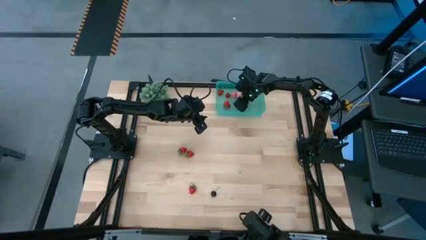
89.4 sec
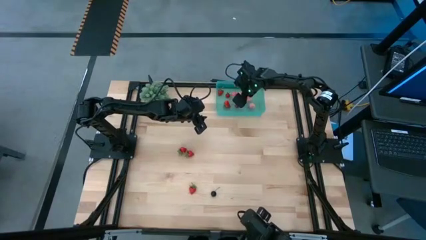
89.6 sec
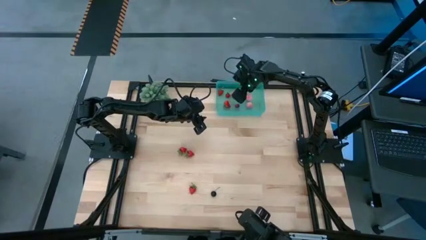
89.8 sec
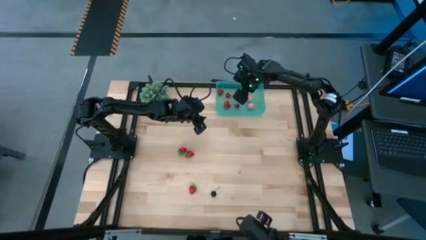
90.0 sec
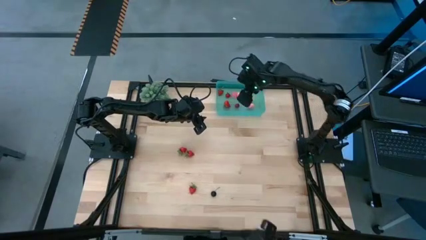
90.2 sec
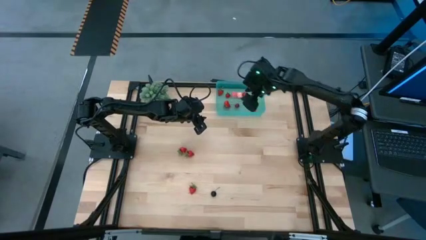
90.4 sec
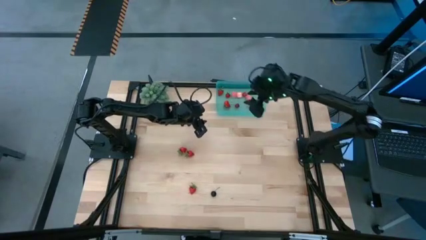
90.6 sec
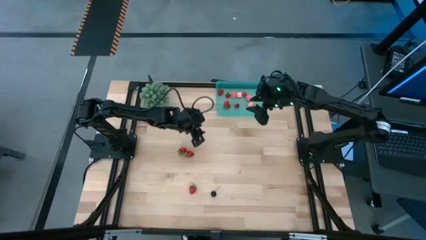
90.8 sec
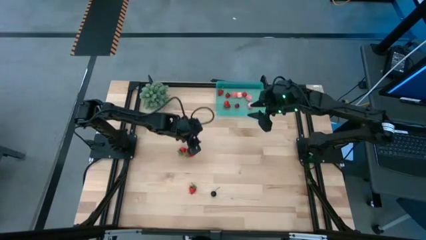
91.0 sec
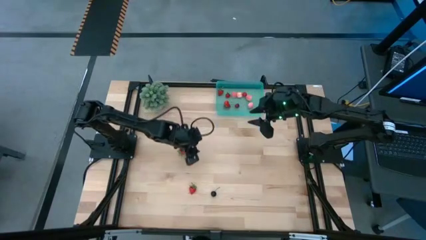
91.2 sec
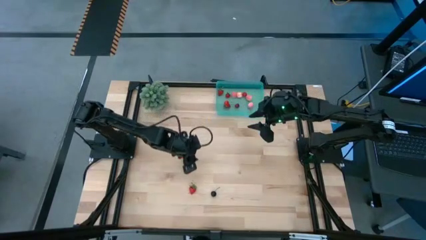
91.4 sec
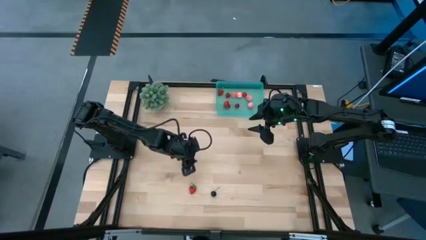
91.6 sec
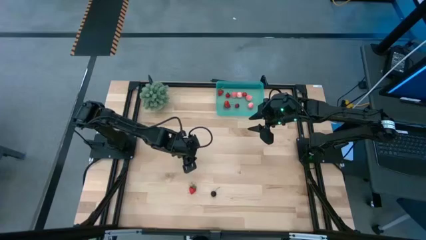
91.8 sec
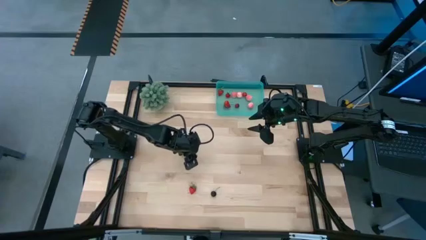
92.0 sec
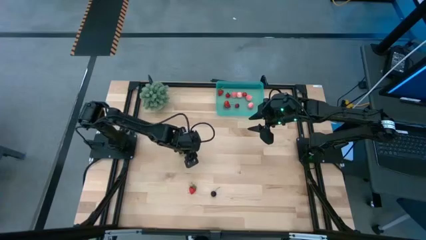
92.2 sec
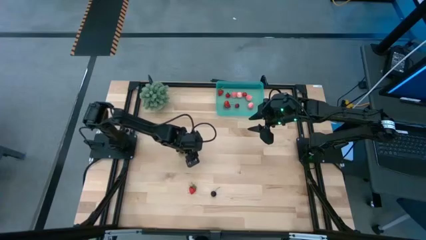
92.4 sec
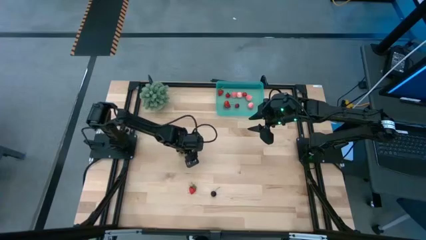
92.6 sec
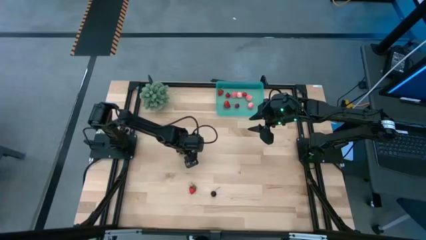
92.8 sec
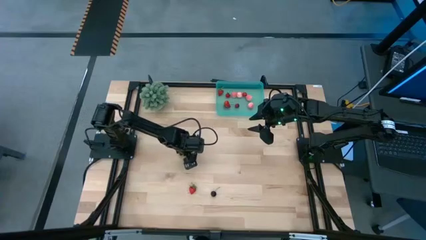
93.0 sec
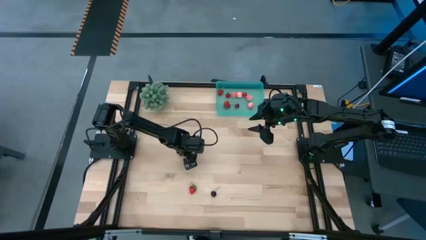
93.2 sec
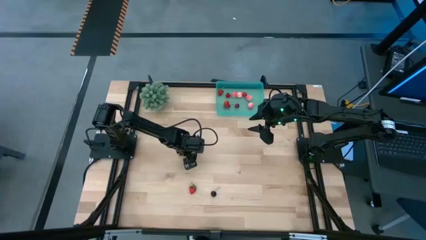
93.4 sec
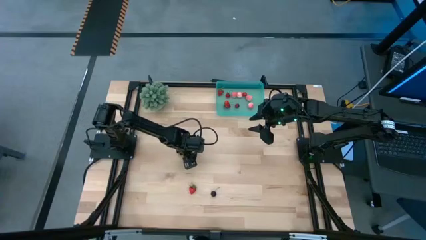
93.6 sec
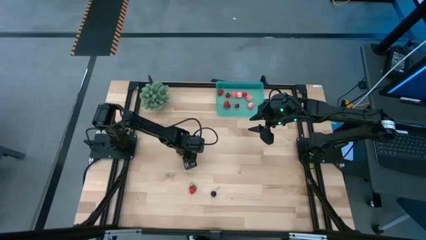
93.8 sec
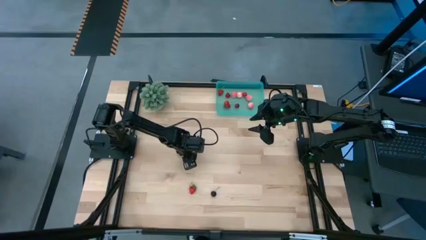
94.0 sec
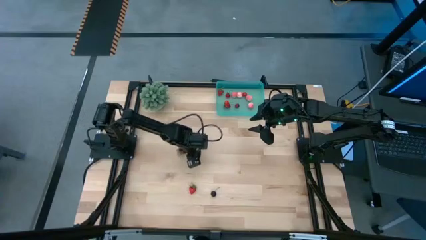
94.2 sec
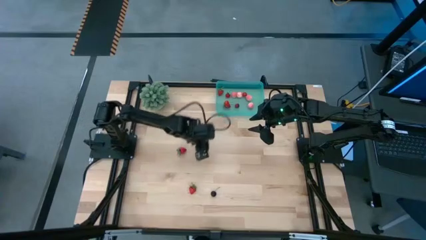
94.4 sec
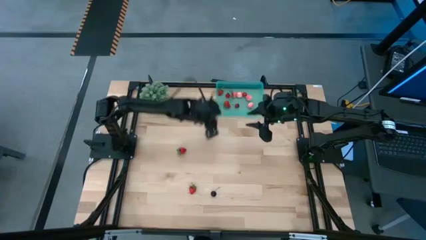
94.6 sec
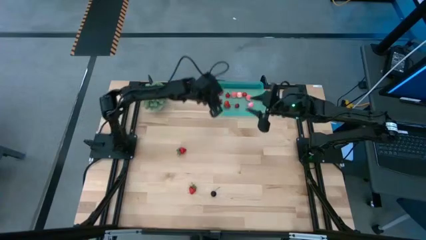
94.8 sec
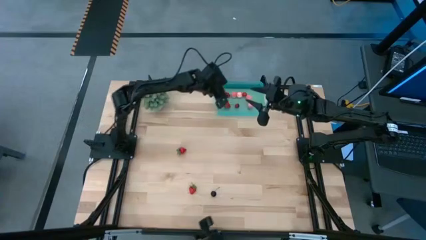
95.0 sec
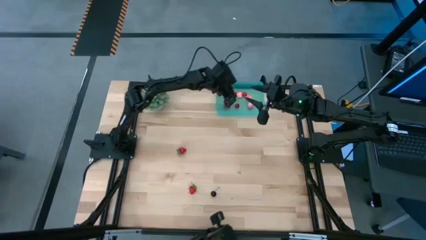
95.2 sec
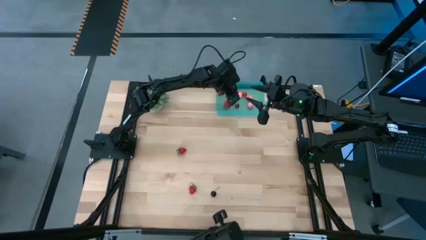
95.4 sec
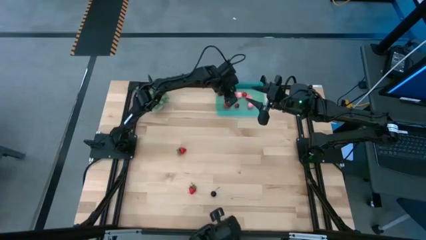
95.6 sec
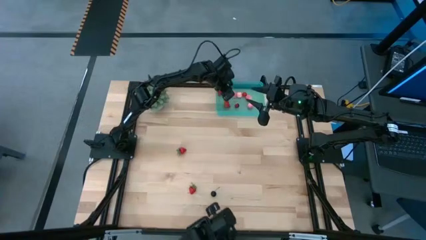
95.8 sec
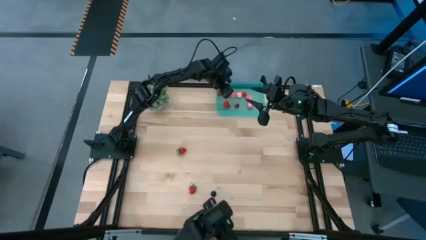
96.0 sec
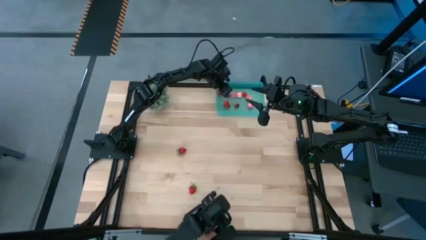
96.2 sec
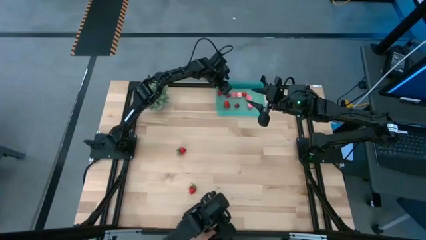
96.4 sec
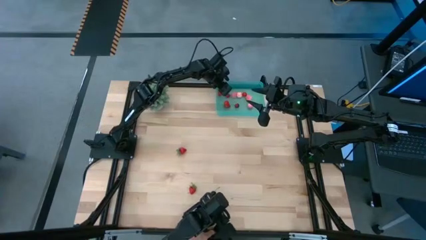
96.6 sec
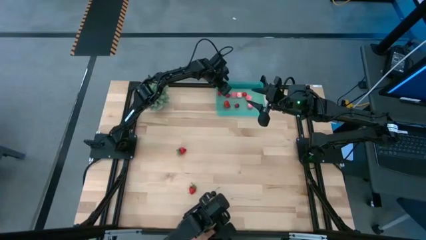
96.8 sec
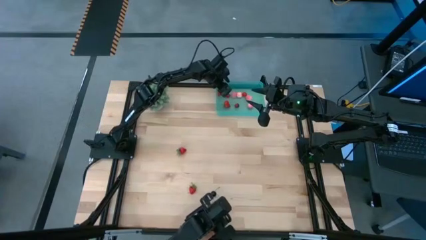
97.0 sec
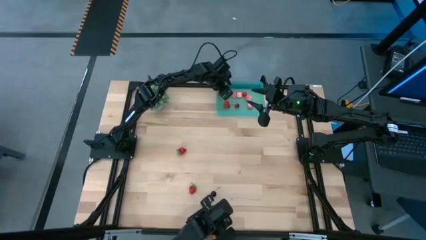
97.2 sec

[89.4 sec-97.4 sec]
Task: Pick and placing Produce into tupperware
Put the strawberry into the blue bin

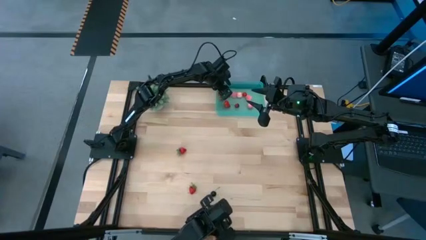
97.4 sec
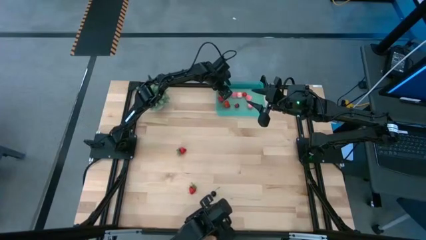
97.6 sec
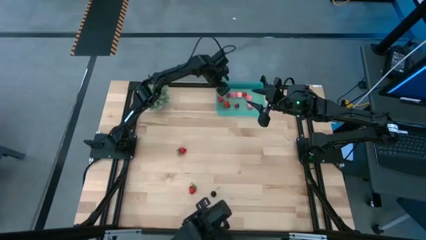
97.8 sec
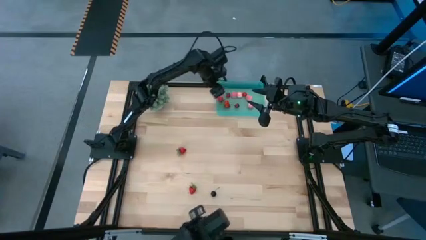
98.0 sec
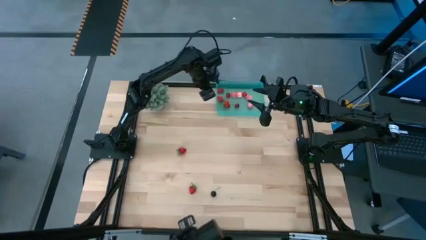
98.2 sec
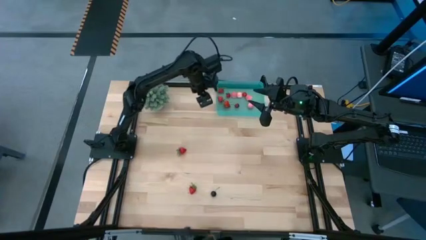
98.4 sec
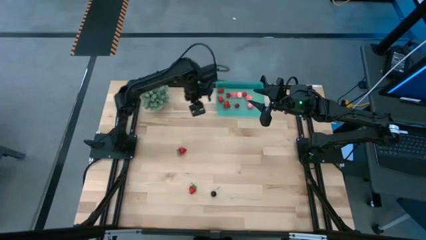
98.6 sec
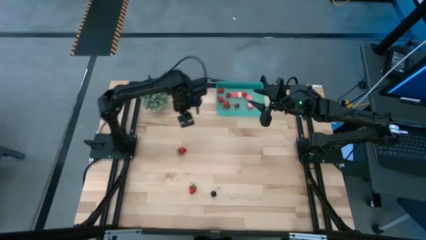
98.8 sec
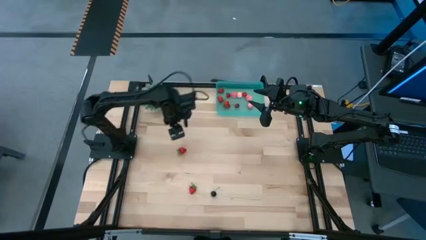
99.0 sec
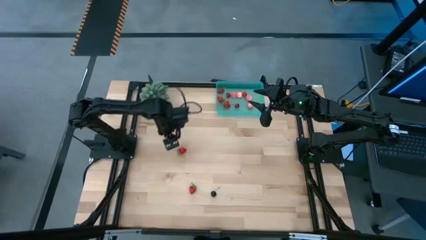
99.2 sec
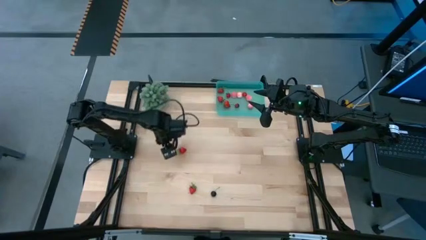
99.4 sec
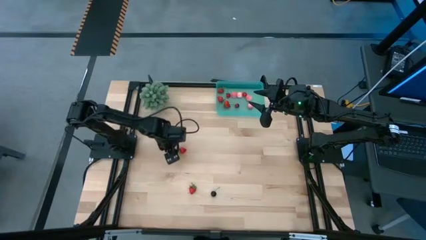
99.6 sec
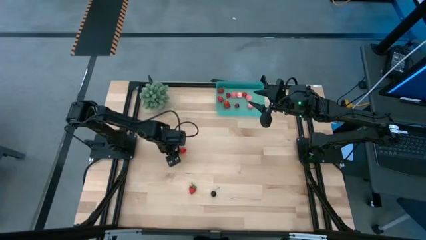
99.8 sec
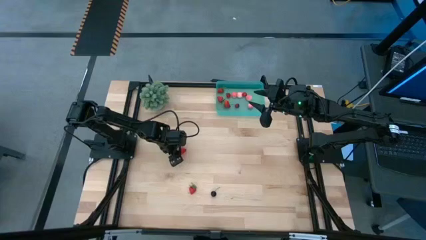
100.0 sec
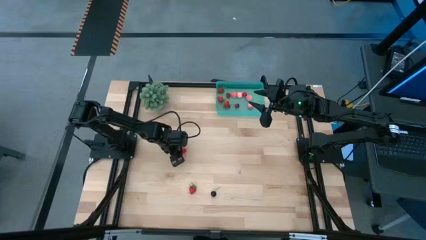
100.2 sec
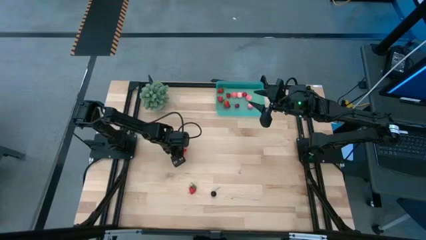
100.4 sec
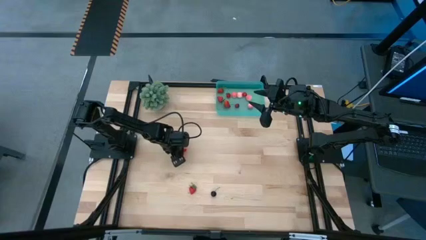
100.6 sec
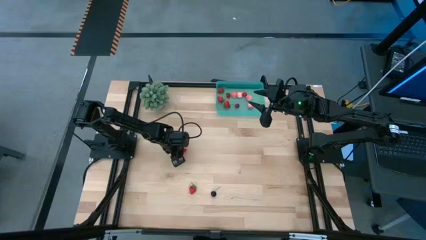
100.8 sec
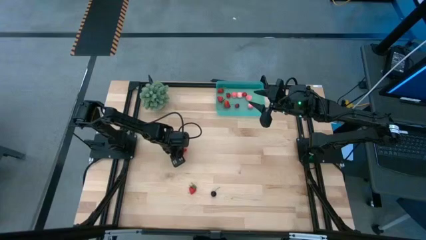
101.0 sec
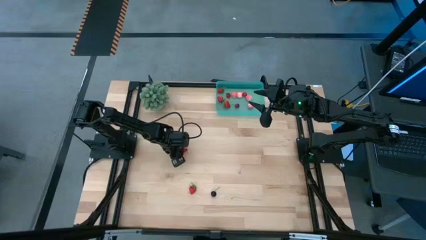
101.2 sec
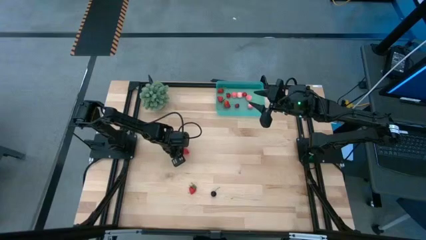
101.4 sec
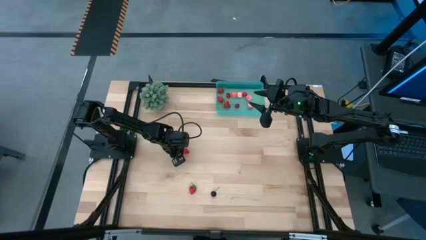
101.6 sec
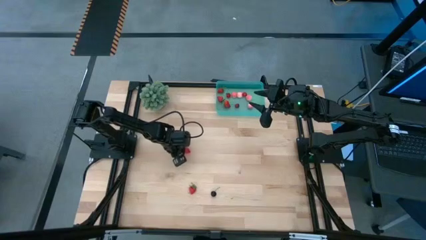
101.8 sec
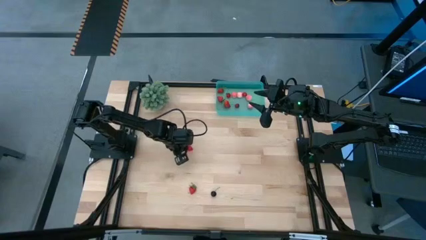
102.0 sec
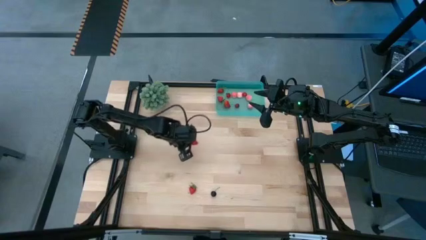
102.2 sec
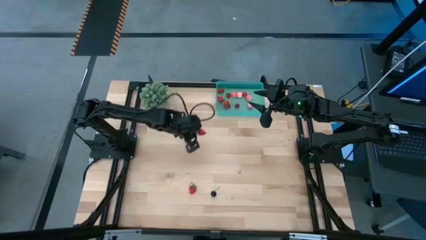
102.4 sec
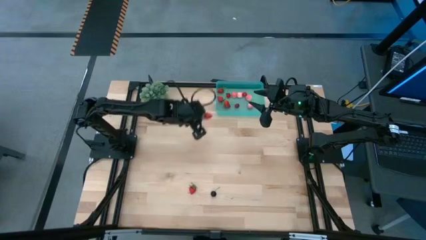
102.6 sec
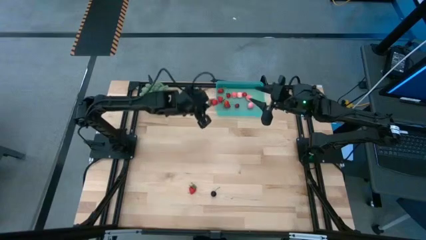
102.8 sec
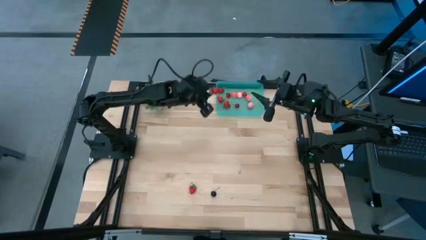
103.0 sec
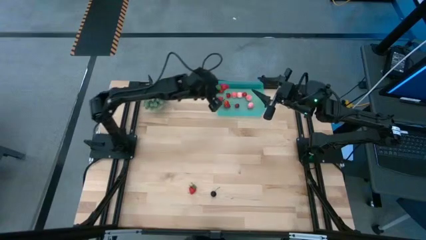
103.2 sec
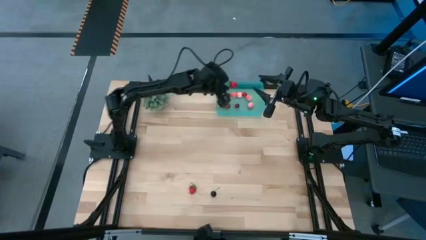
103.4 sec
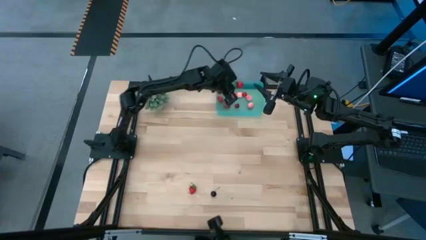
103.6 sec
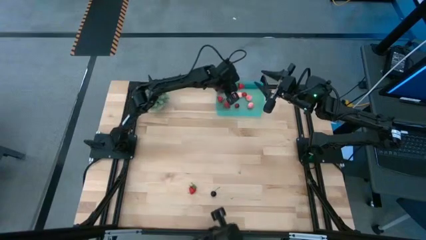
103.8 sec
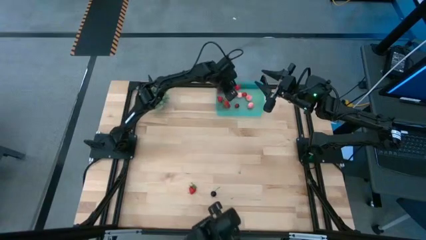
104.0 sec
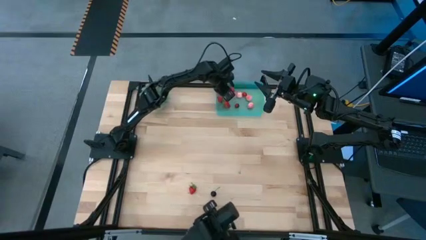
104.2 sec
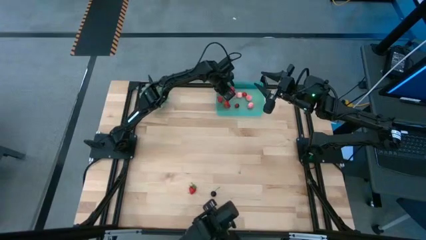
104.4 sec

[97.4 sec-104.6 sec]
Put the strawberry into the blue bin

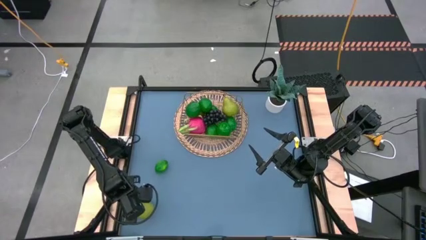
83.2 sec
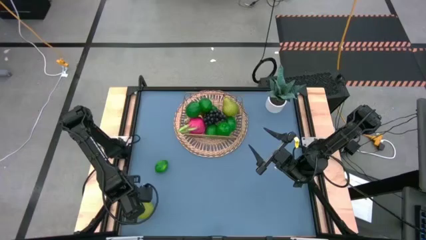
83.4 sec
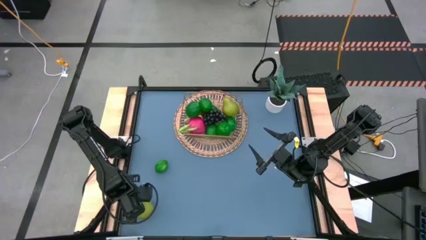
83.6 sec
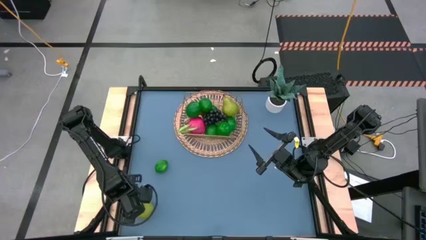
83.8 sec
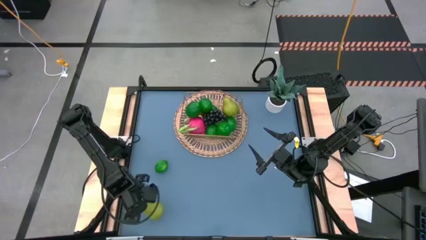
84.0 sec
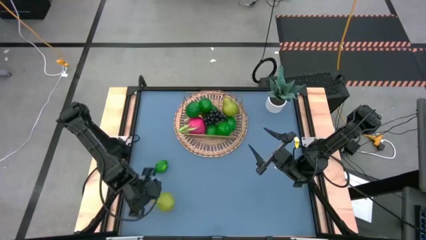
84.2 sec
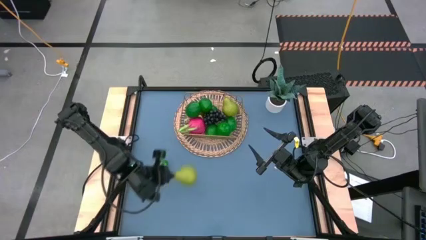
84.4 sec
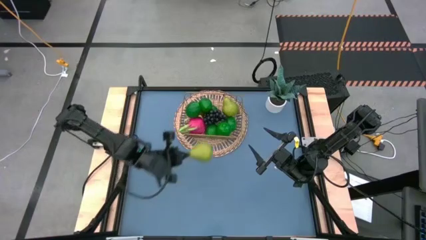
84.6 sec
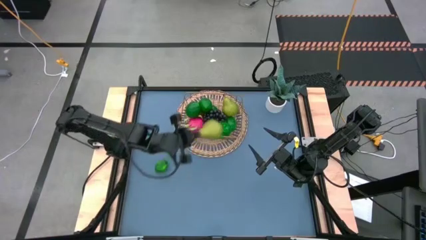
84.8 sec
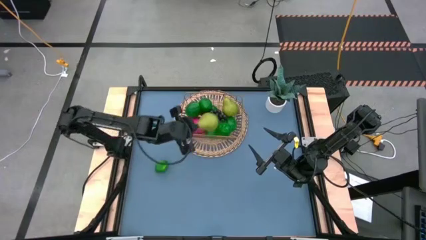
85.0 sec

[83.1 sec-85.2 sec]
Task: Build produce basket
Put the green pear into the gold wire basket

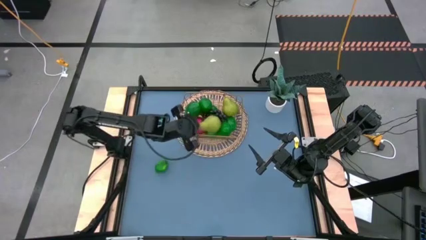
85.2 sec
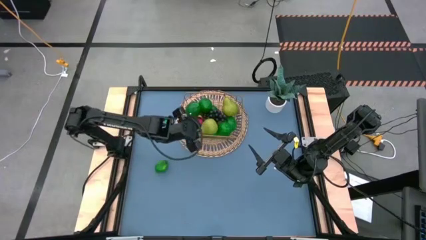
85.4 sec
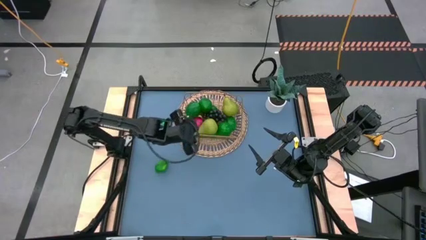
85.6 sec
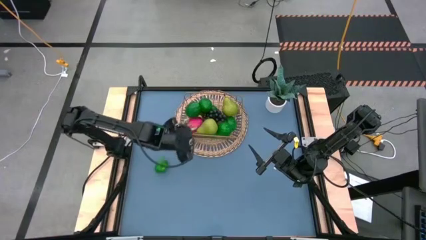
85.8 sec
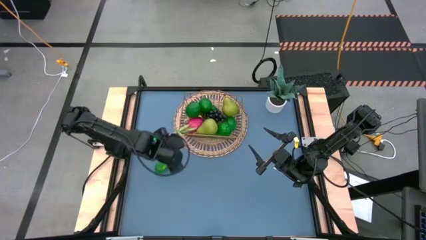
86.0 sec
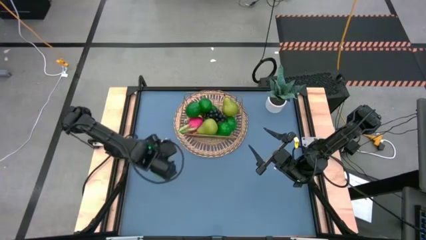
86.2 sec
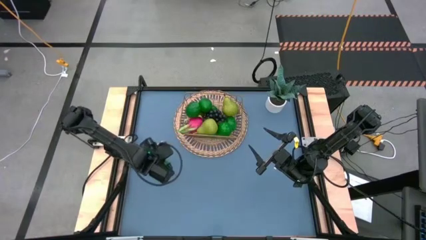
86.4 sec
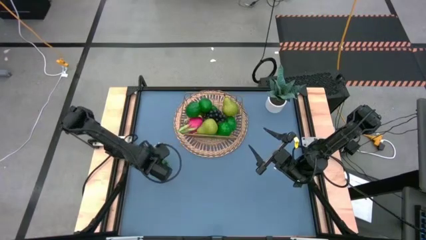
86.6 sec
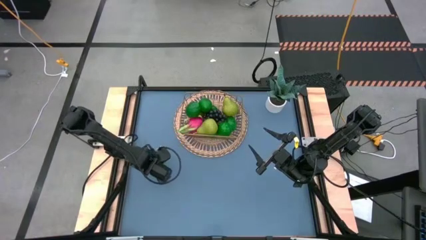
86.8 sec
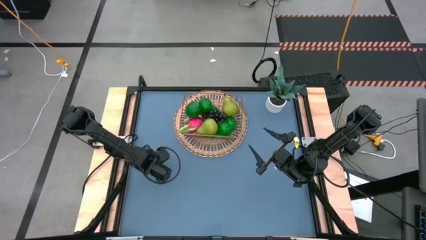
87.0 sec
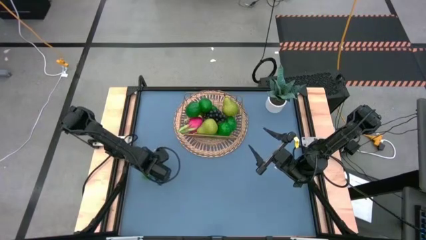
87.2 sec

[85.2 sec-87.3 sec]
Put the green lime into the gold wire basket
